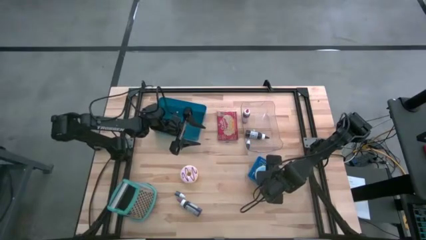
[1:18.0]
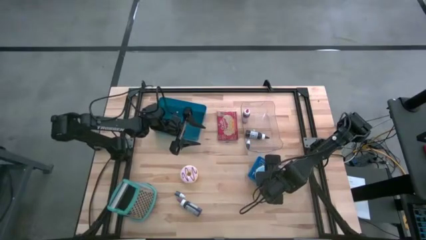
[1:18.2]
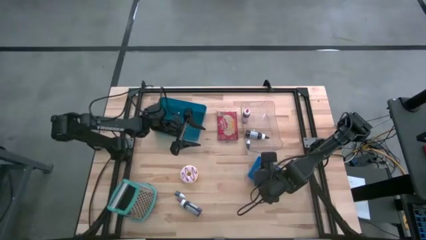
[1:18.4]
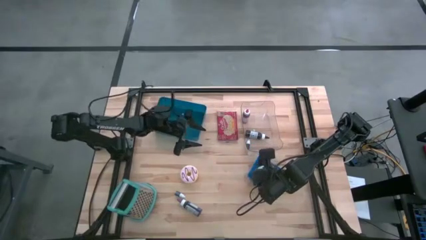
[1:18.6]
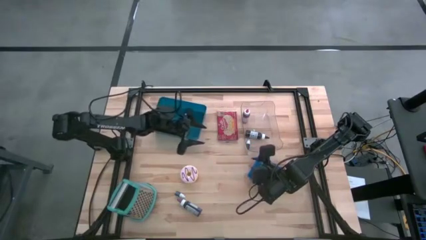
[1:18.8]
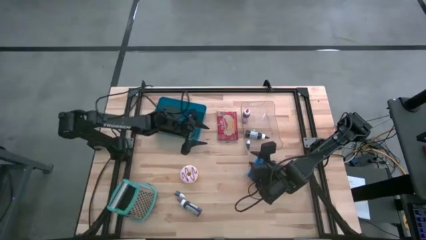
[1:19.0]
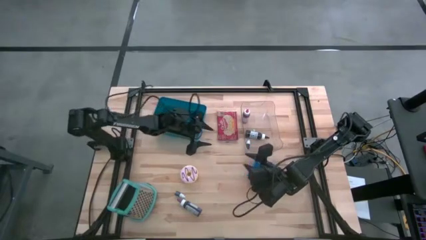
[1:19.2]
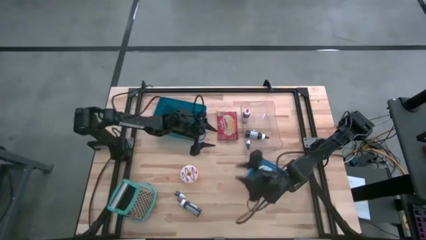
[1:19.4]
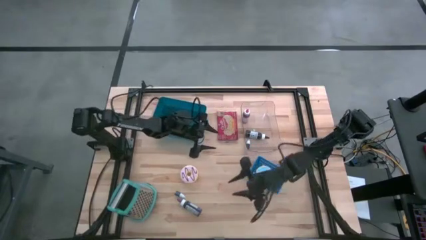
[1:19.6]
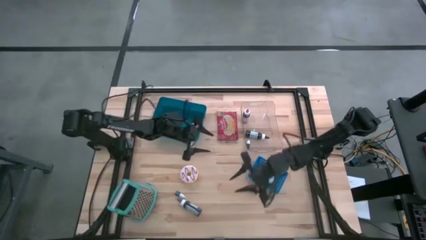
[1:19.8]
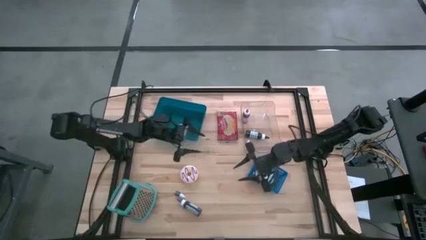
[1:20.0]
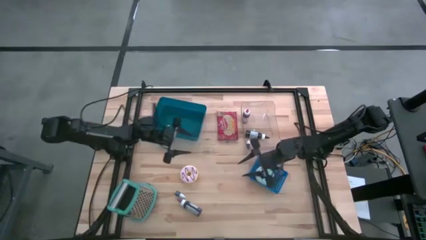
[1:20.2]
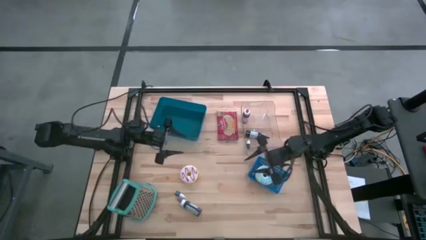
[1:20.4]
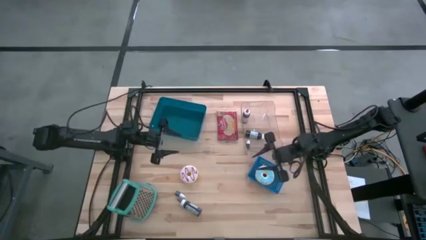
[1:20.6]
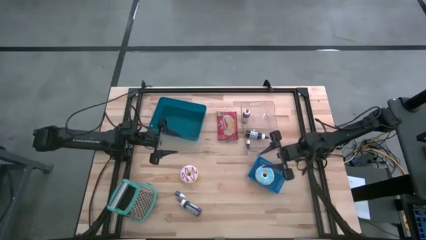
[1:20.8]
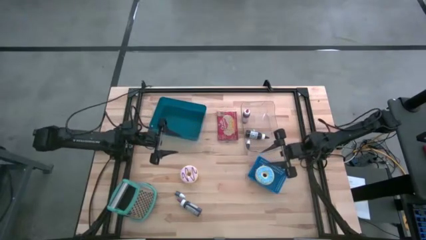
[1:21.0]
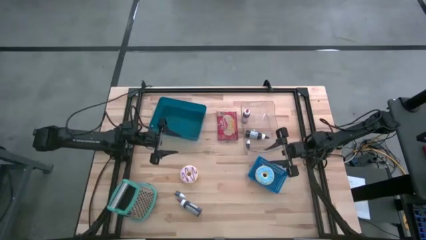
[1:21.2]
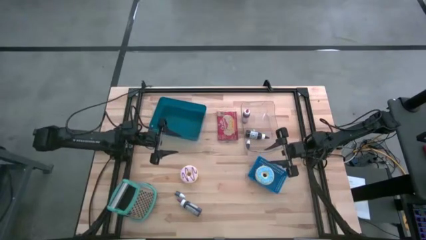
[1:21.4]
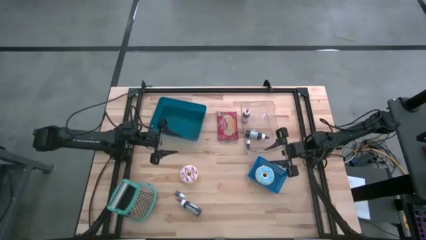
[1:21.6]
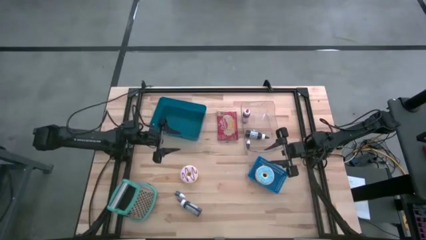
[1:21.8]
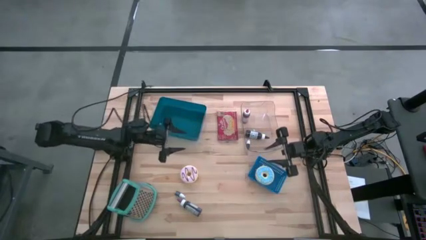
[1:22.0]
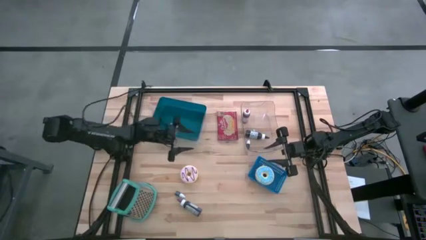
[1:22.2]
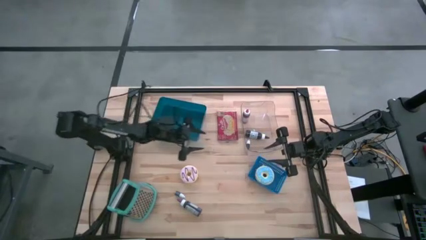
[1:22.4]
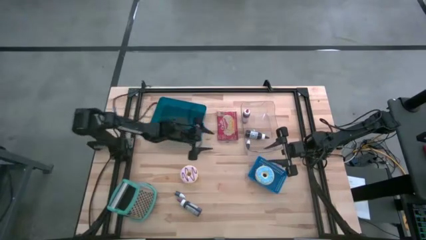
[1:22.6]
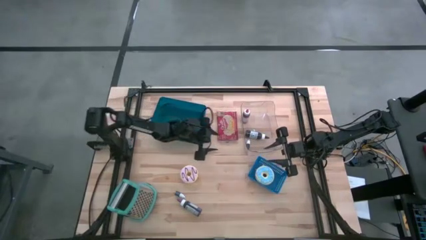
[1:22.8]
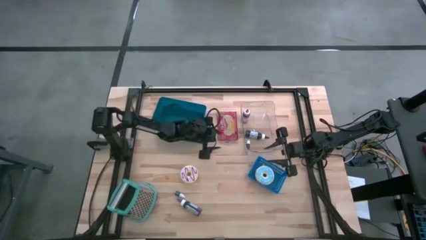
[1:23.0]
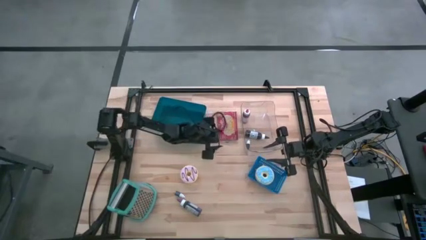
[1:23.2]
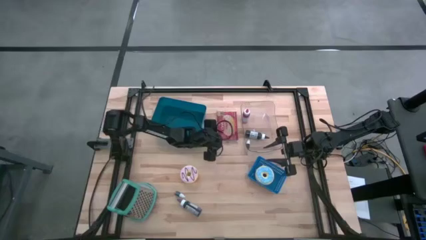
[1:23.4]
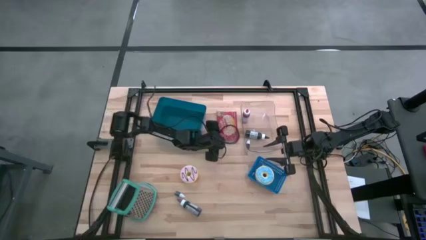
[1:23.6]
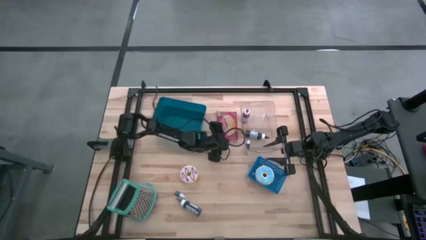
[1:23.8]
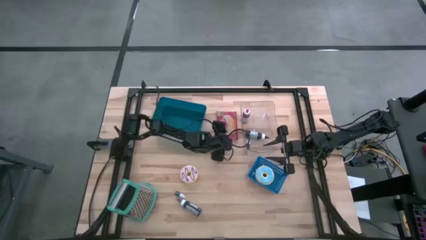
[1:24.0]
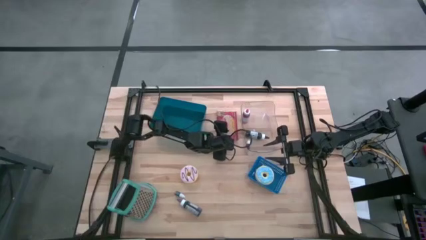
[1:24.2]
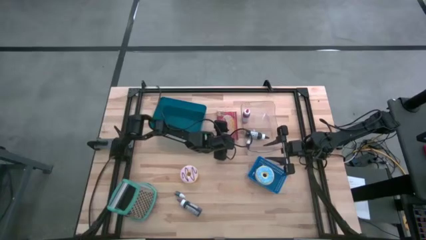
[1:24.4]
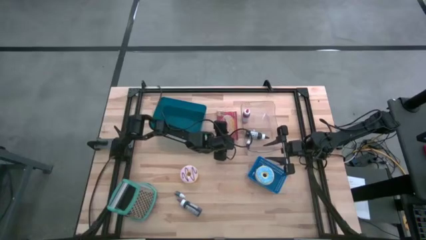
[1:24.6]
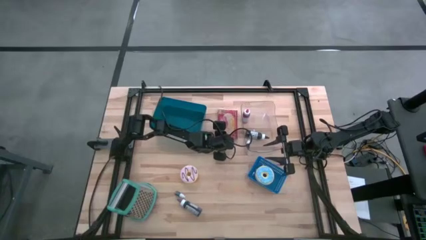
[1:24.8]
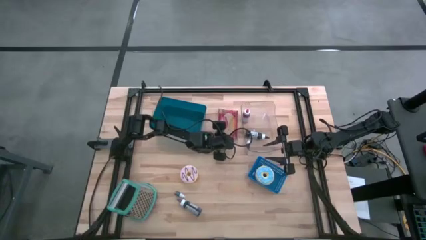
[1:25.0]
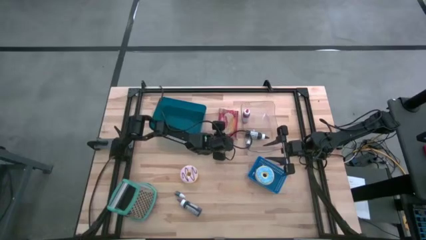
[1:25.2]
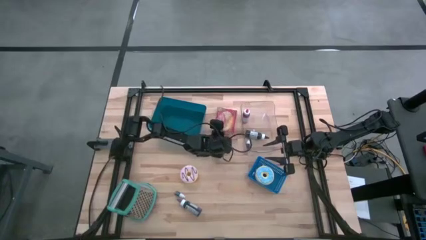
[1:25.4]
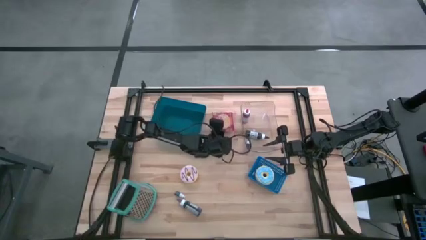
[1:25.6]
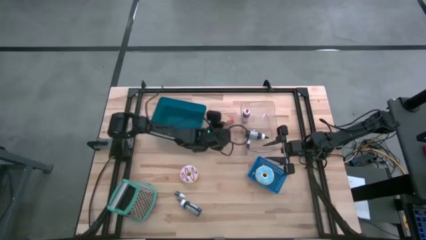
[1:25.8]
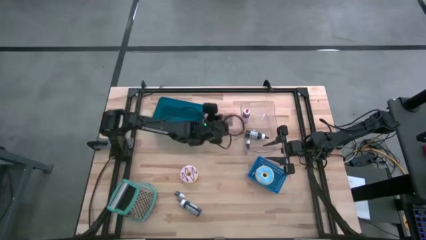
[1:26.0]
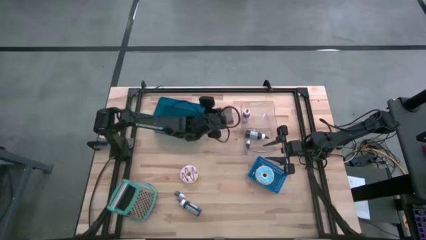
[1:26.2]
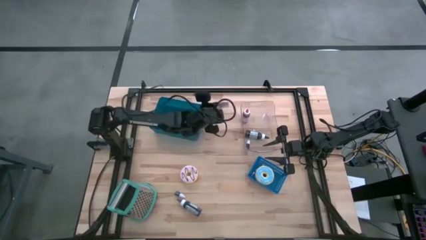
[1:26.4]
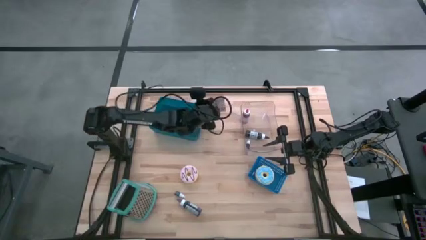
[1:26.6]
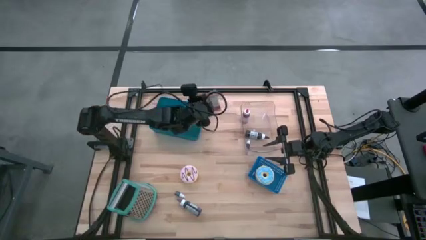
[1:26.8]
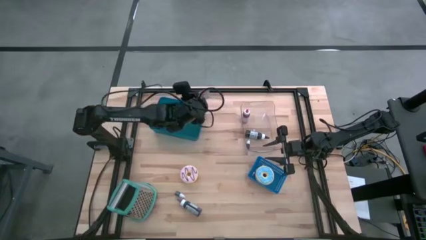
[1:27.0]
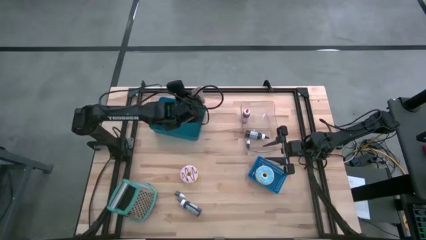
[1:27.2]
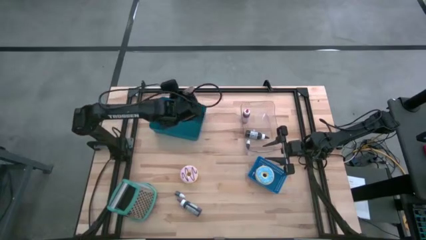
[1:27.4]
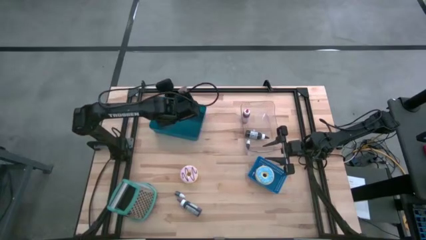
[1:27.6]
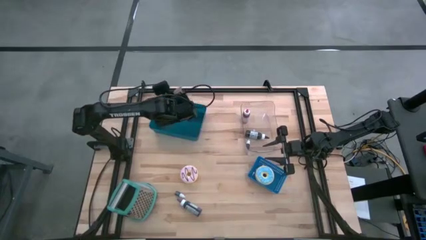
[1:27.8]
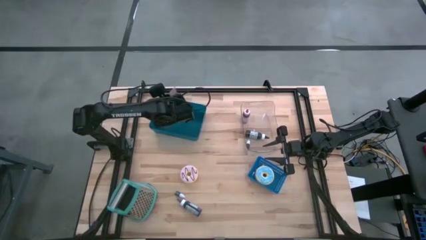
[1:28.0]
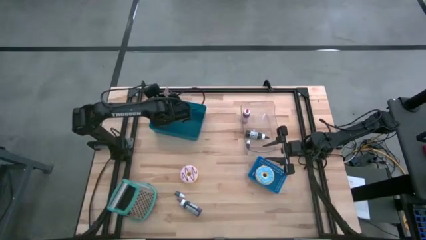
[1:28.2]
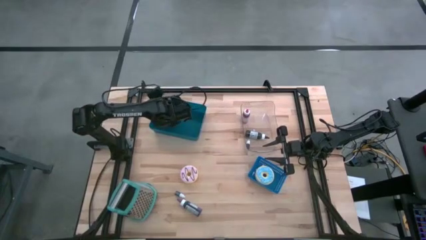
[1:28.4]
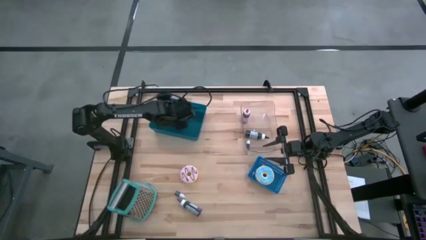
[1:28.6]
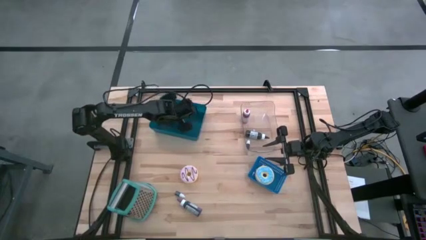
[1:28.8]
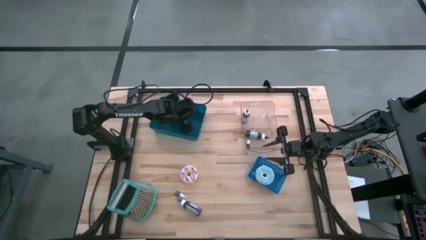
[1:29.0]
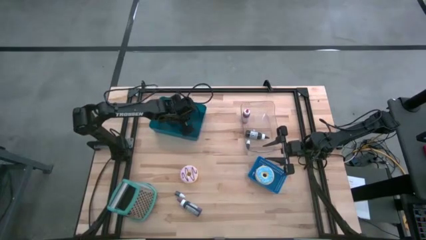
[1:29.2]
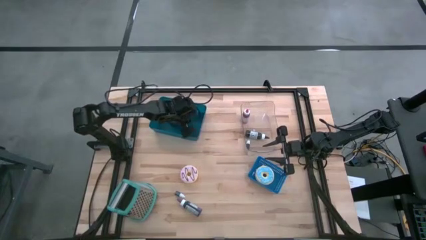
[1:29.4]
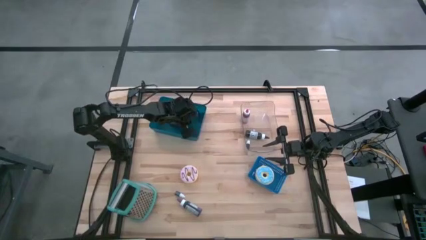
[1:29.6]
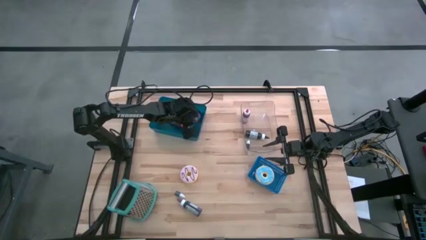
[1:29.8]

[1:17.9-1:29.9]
Task: Pick & Place Food Item
Put the red popcorn bag into the teal bin

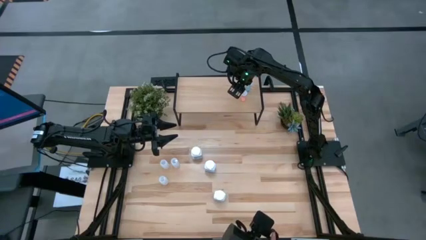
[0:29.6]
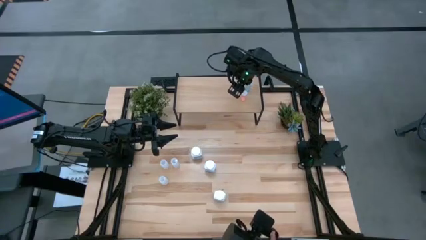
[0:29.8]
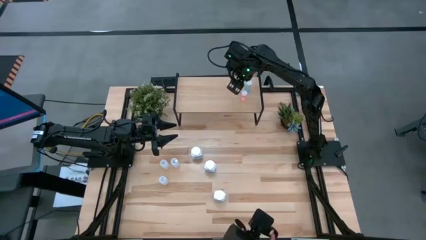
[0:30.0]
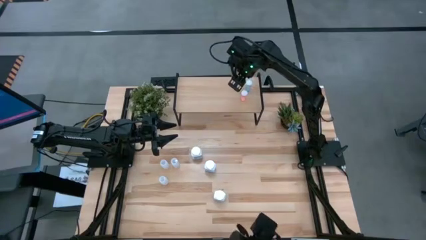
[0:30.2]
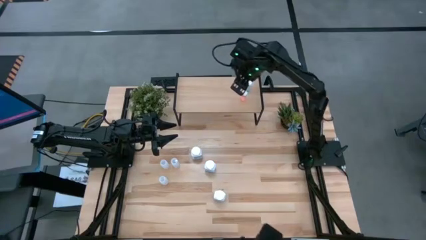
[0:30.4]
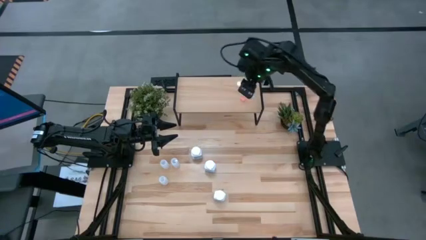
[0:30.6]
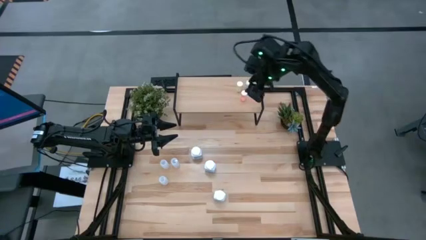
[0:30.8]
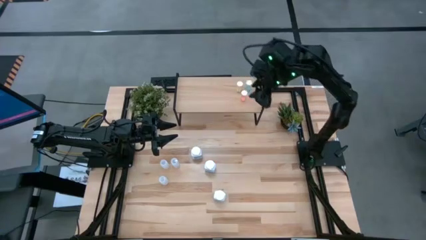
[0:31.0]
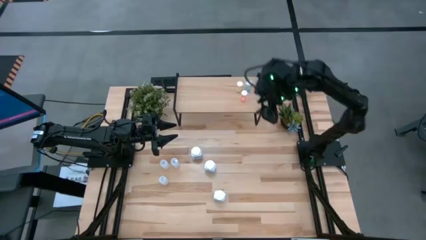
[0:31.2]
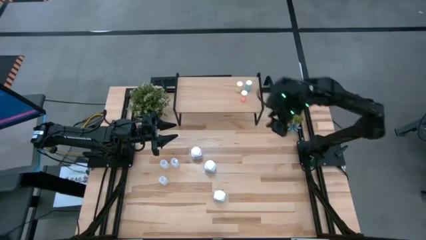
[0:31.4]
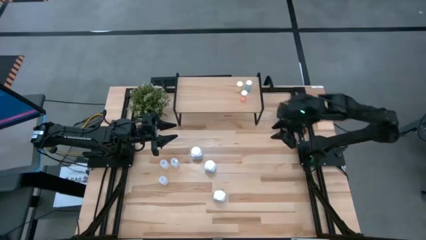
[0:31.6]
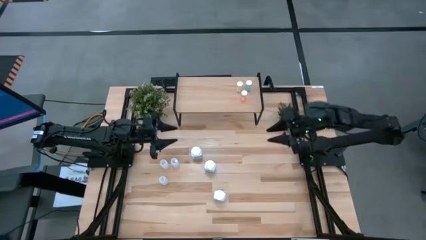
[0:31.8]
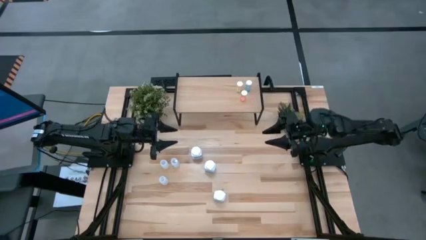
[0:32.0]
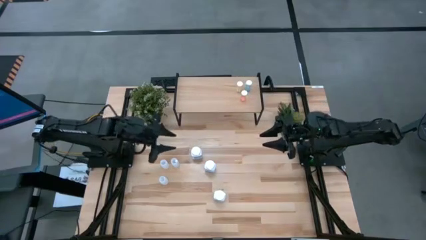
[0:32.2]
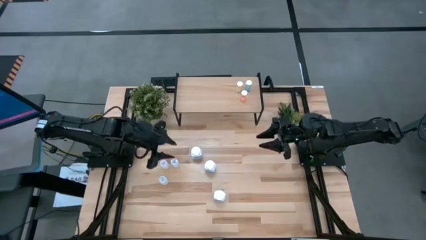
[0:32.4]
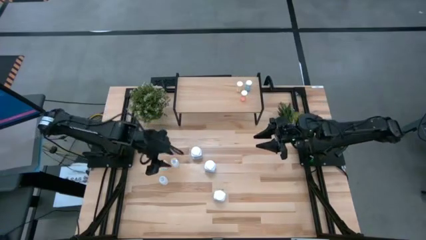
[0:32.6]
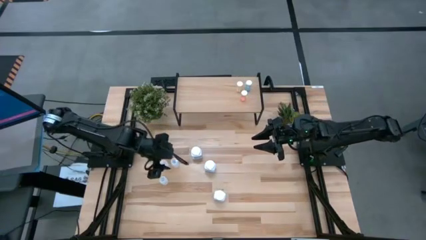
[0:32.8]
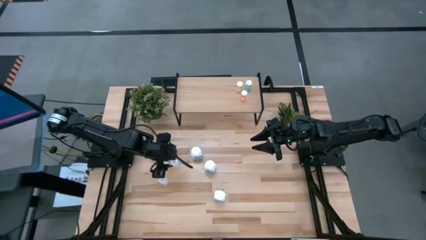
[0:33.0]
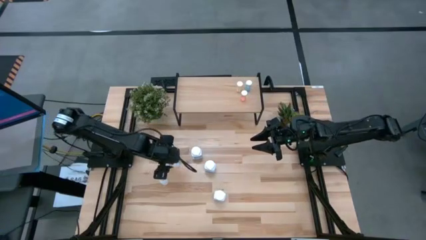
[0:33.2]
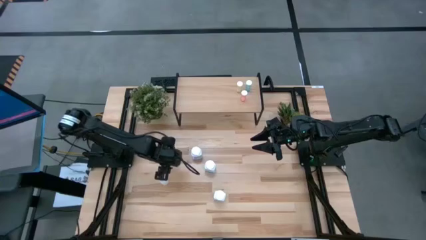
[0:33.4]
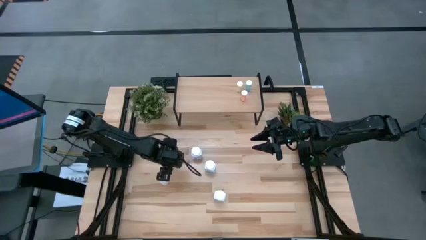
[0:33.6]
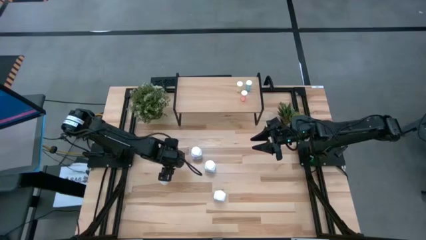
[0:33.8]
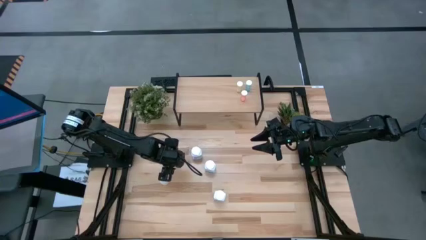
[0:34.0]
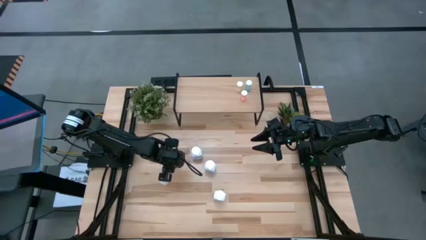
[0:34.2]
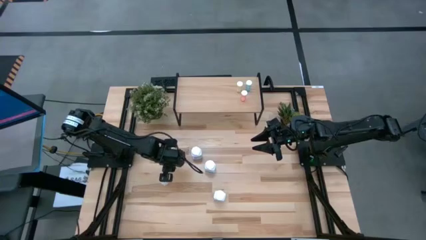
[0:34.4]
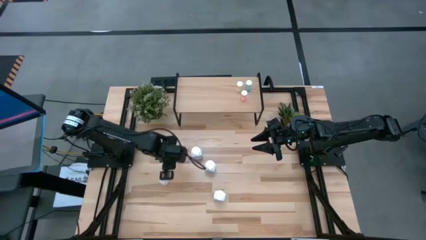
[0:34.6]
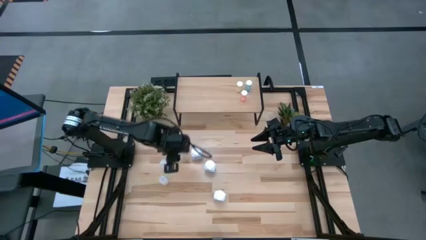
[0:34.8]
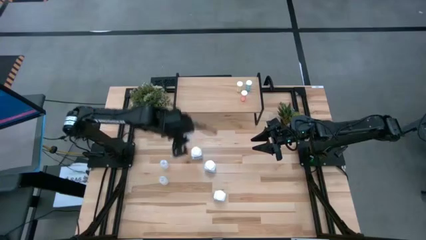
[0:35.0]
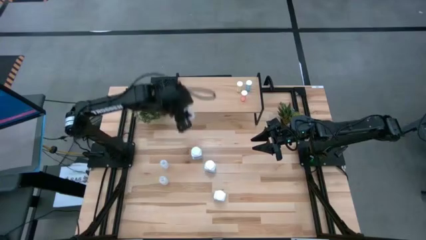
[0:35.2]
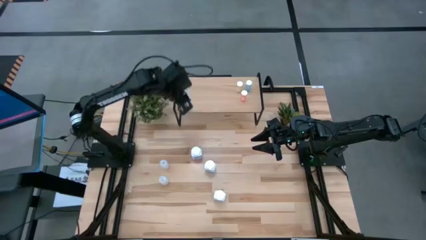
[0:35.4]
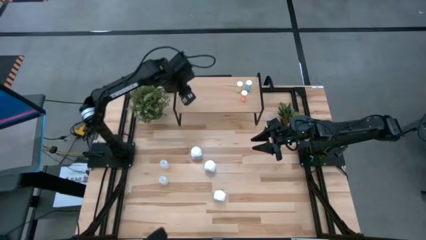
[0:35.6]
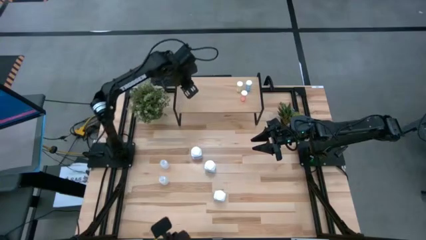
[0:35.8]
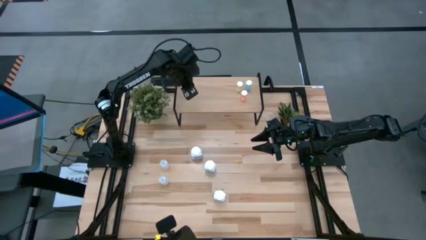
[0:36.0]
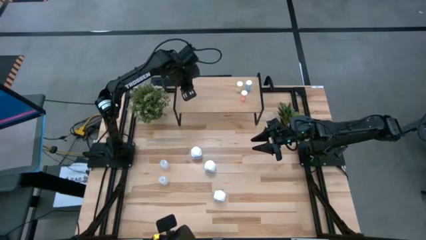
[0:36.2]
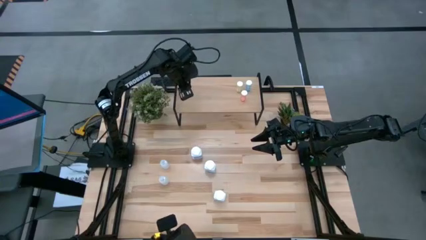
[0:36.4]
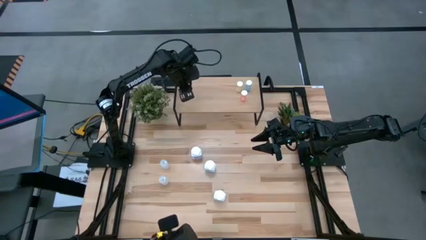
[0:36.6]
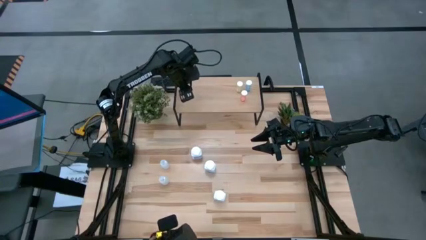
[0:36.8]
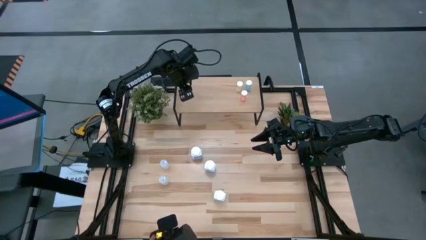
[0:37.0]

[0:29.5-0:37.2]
Task: Pick and place medicine bottles onto shelf by color
Put the white pill bottle on the shelf
